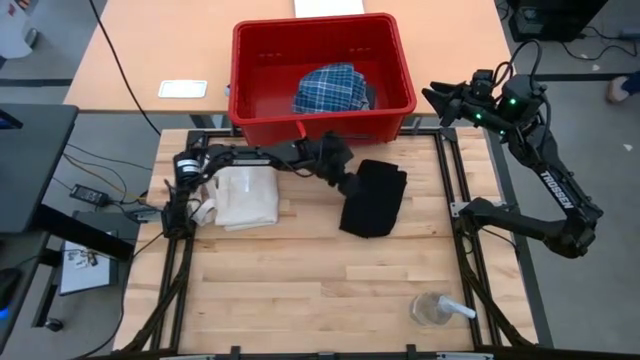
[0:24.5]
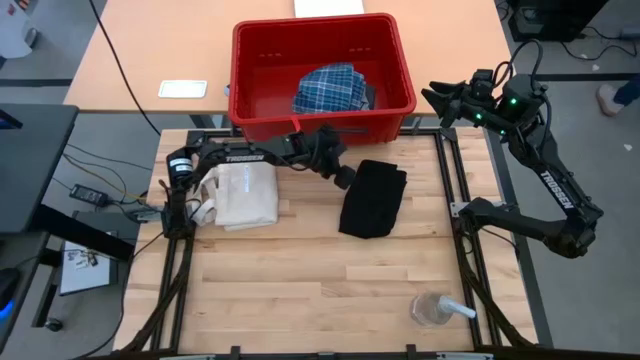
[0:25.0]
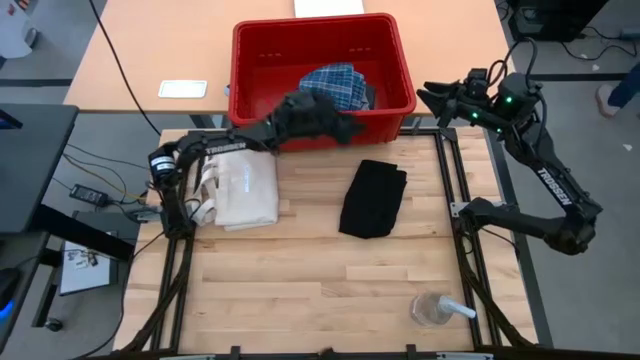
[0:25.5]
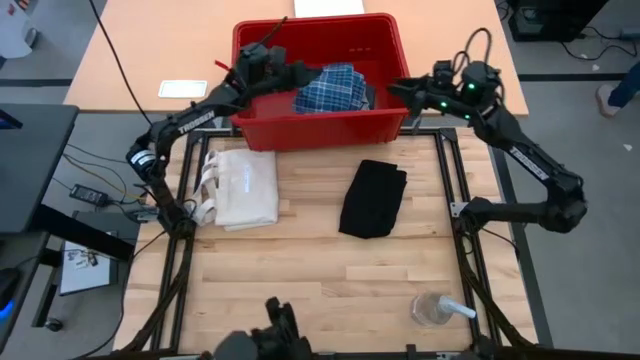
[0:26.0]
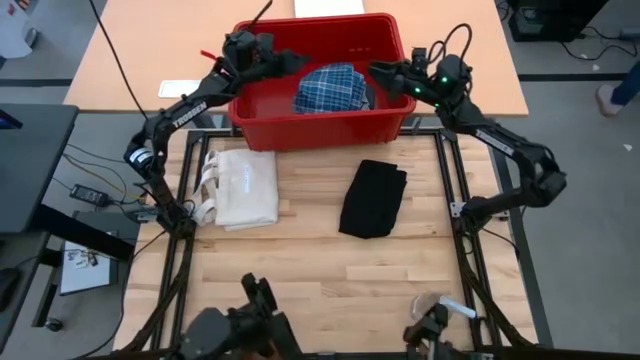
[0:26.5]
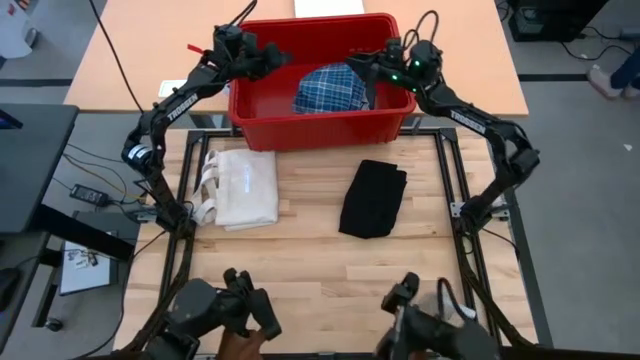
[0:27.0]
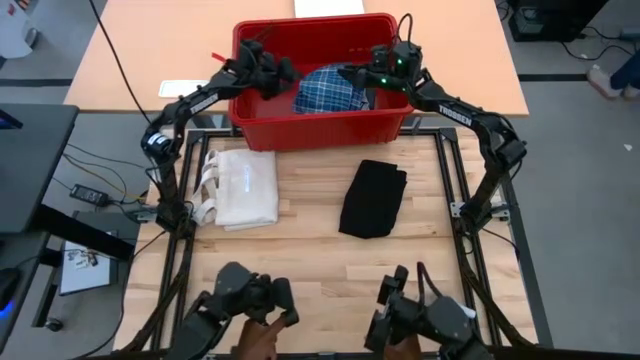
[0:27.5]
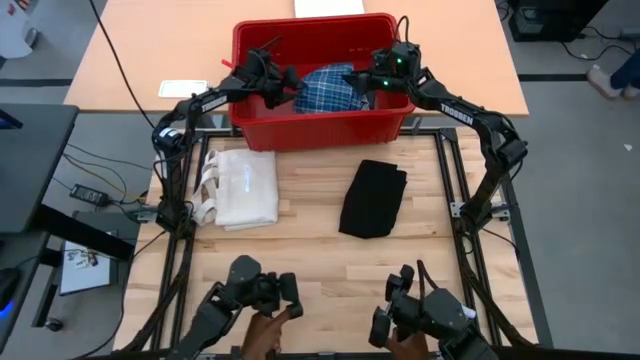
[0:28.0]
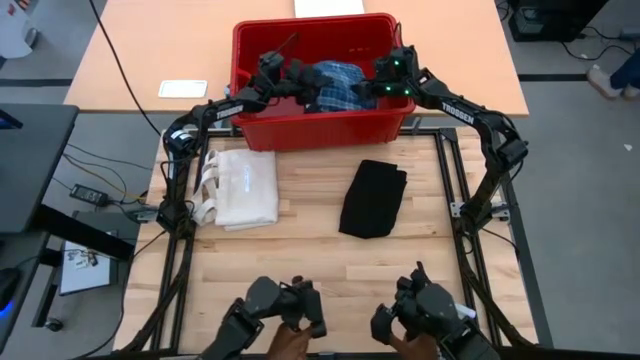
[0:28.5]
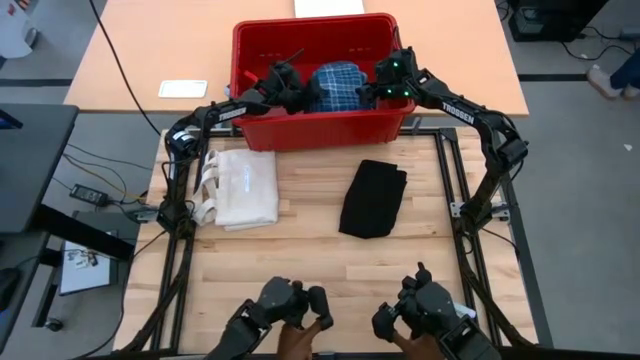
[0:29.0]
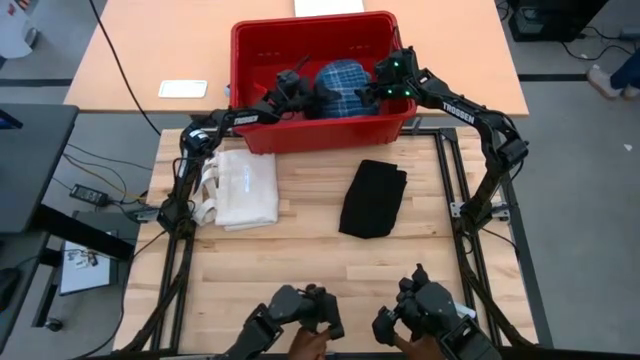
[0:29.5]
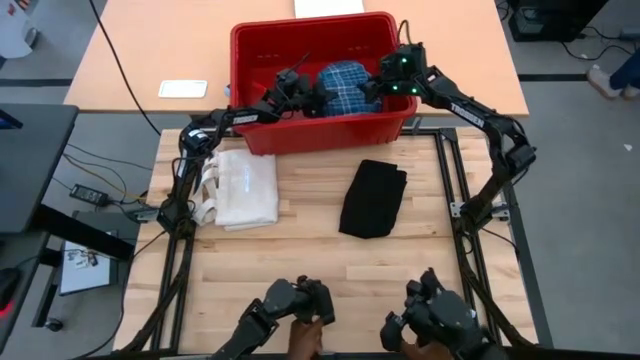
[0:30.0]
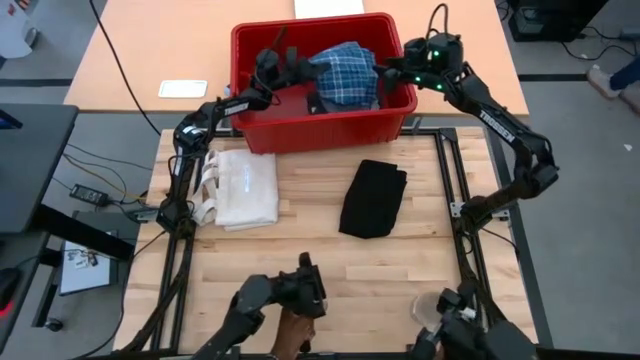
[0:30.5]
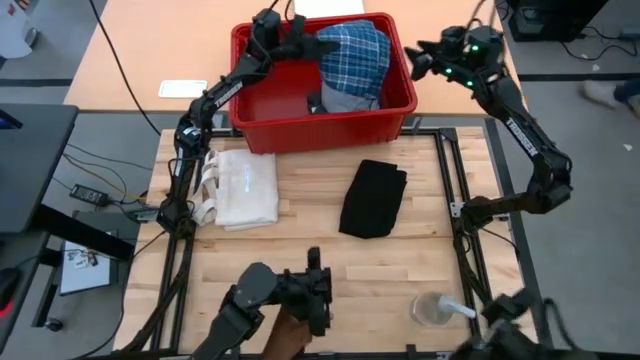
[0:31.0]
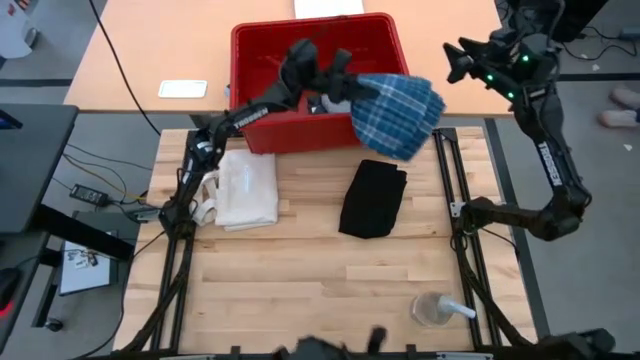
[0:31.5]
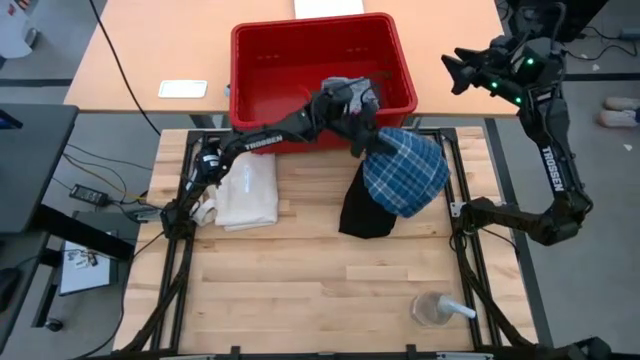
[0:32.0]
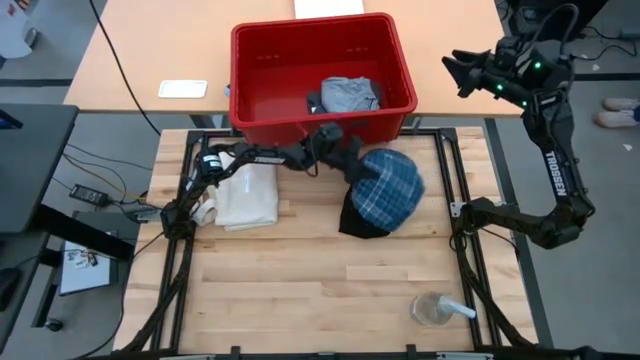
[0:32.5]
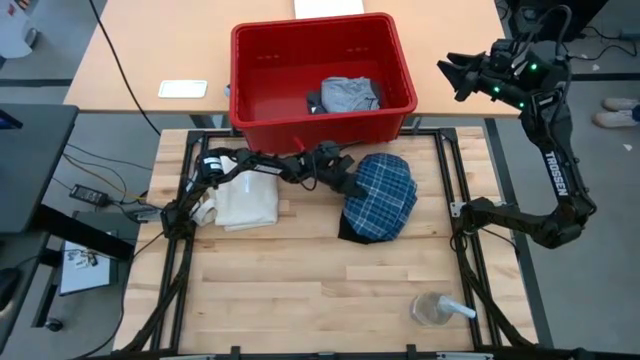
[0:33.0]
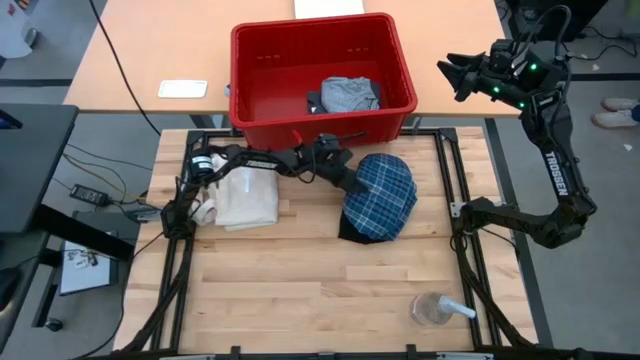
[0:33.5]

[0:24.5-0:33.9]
Task: Fold laundry
Remove the blue shirt from the red laundry bin

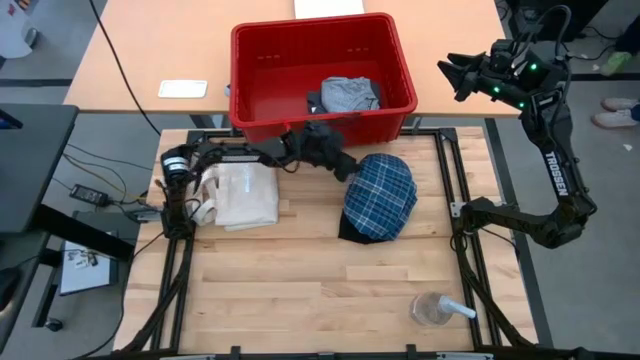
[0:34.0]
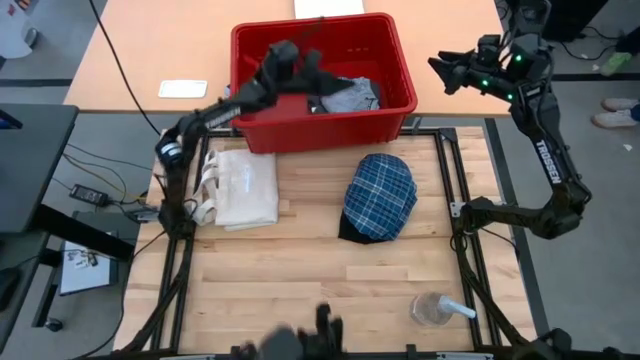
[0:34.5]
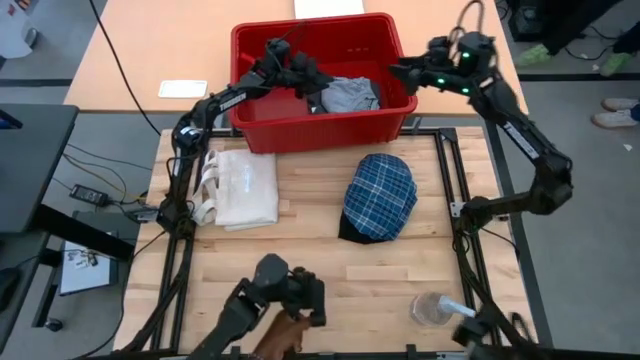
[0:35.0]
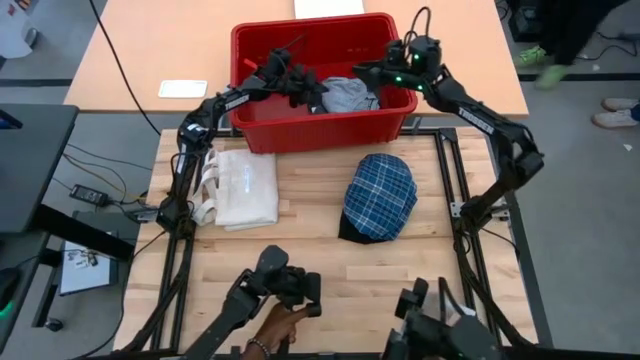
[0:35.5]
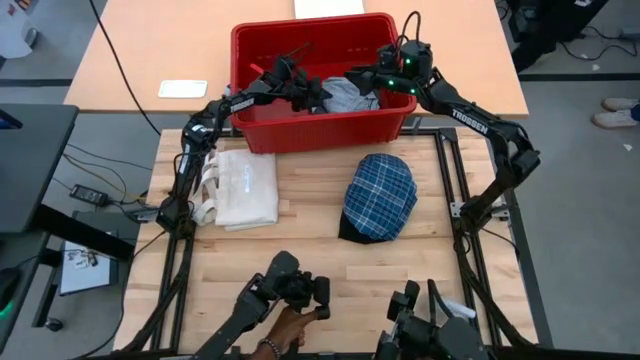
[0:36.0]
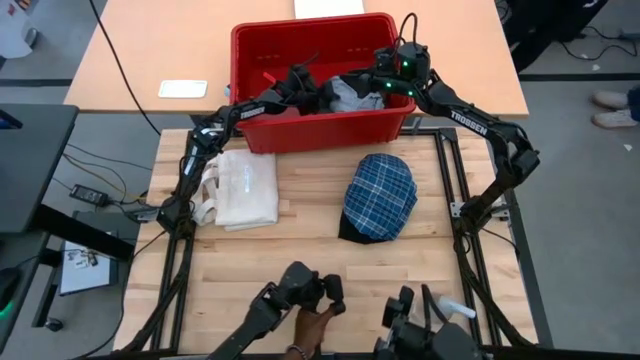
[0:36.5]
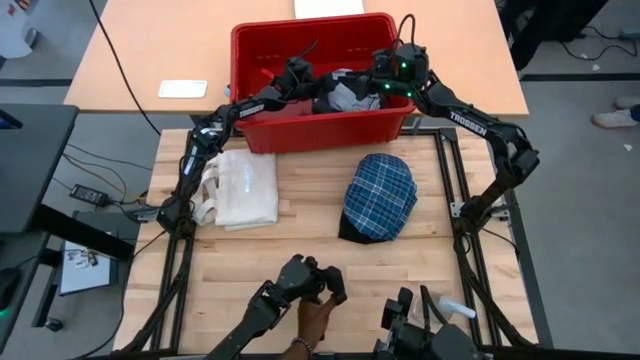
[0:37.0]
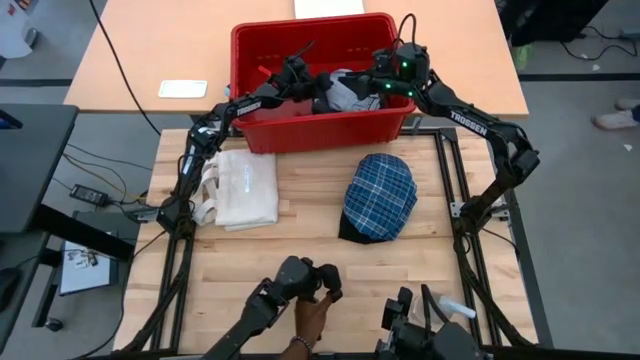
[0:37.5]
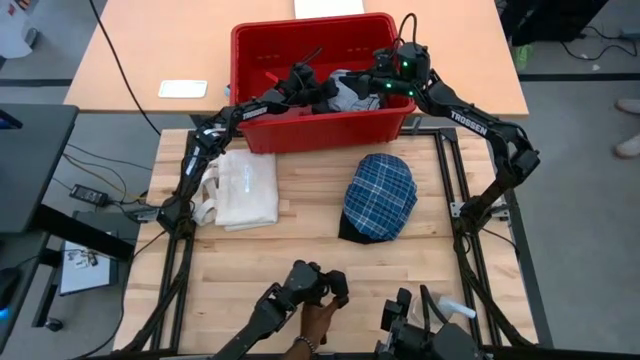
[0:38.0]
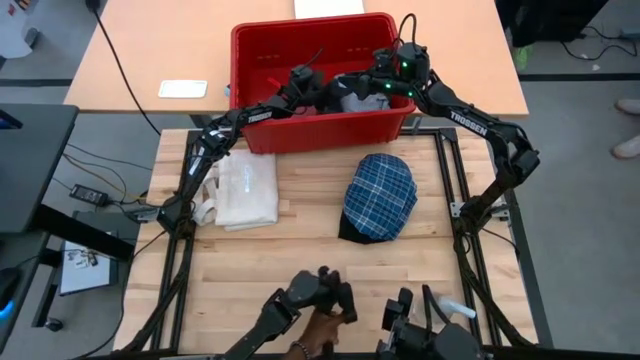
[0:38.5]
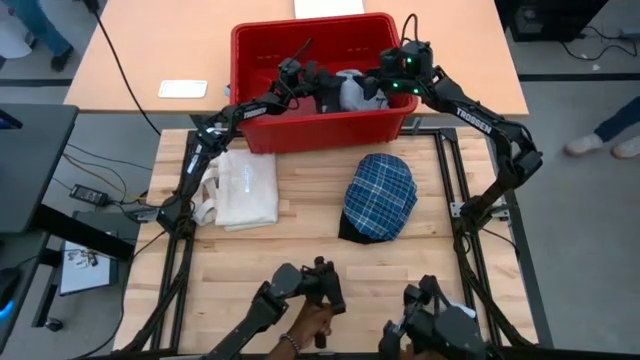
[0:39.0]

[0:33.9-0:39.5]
Remove the gray shirt from the laundry bin

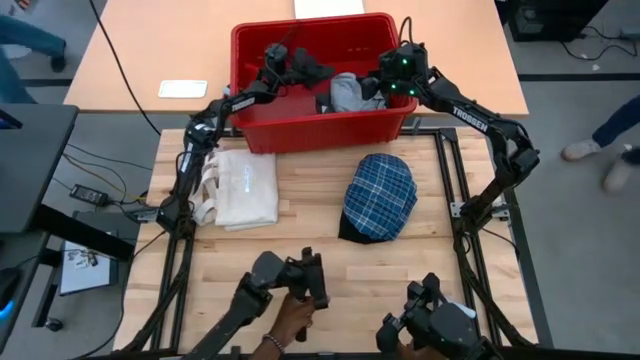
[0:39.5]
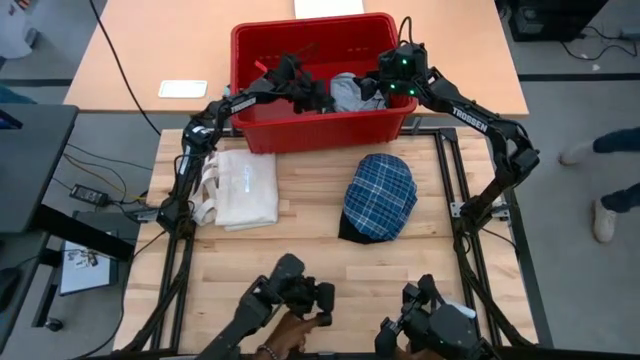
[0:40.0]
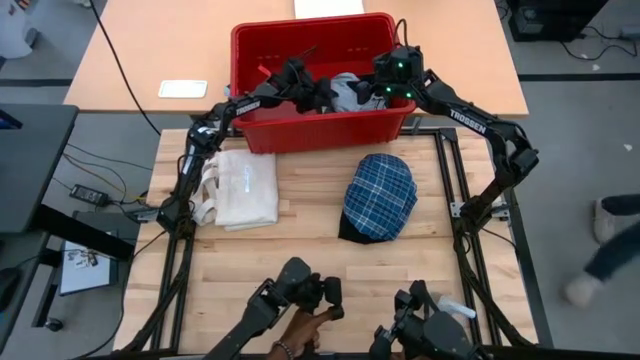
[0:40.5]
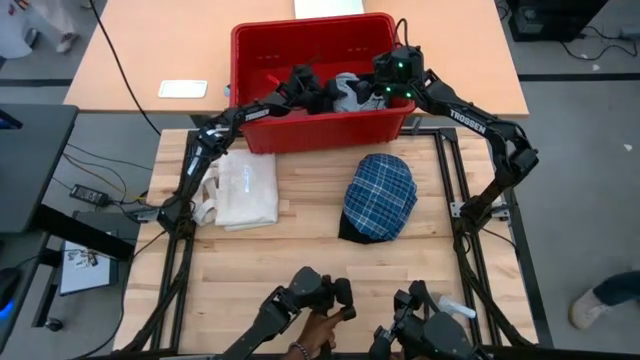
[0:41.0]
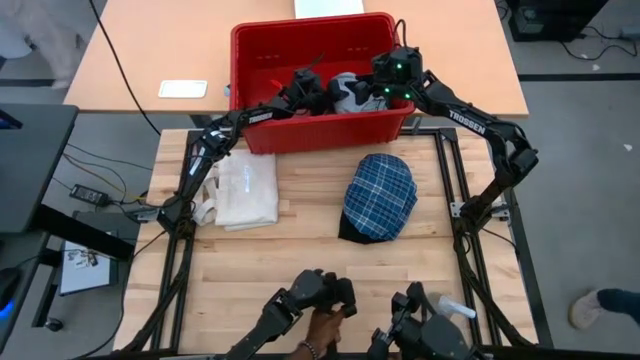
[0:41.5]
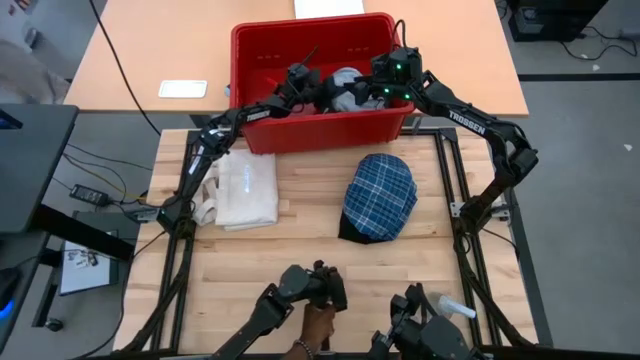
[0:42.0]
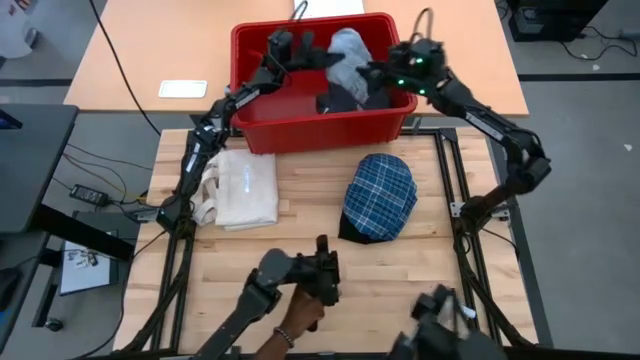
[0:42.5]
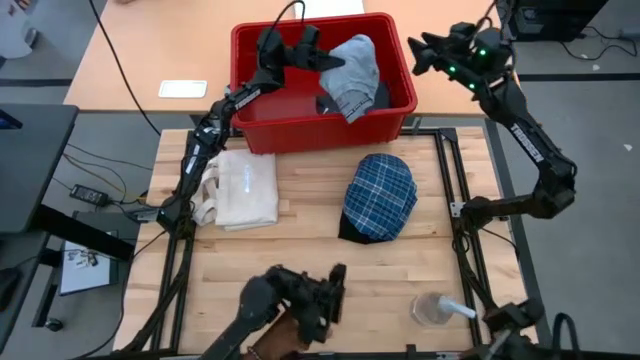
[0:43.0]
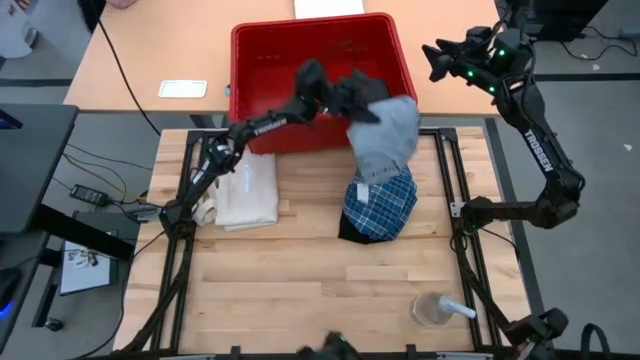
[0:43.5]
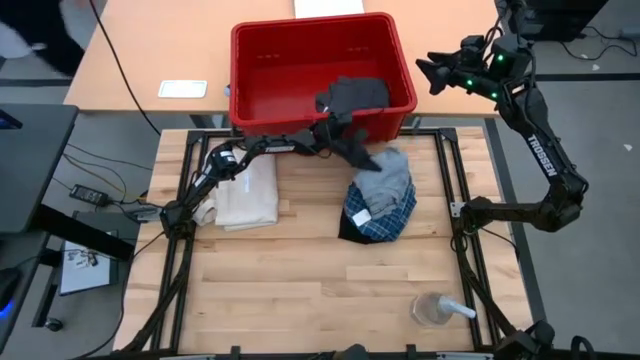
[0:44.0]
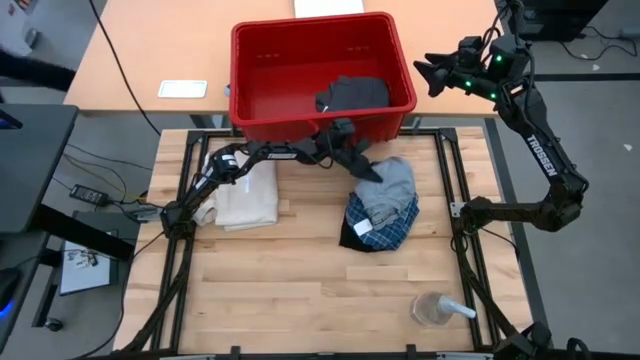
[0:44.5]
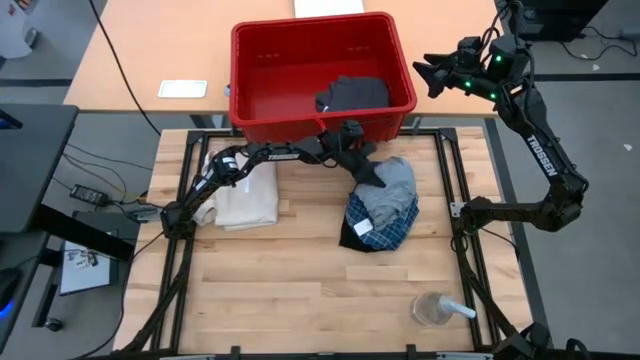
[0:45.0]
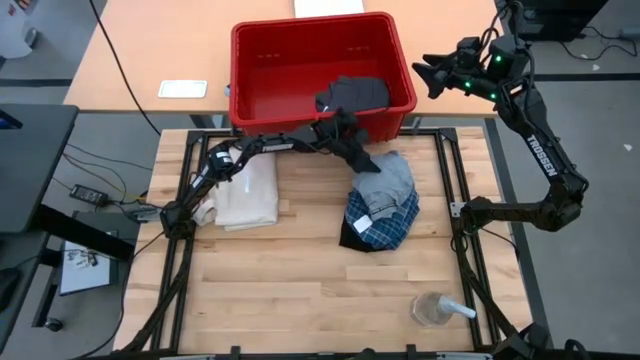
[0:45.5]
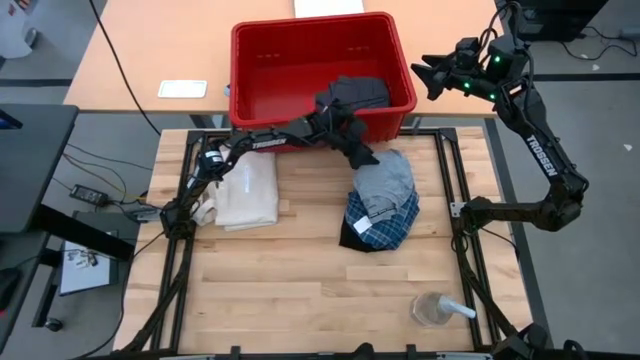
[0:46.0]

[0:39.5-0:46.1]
Remove the gray shirt from the laundry bin
